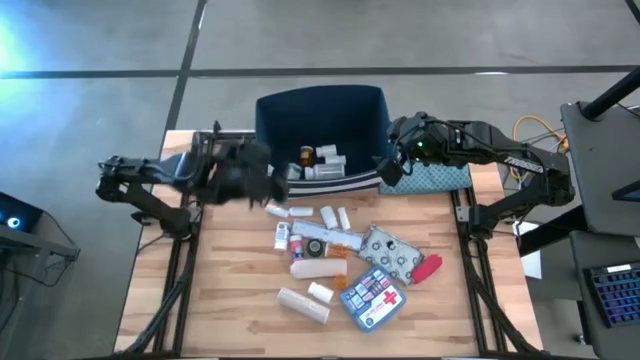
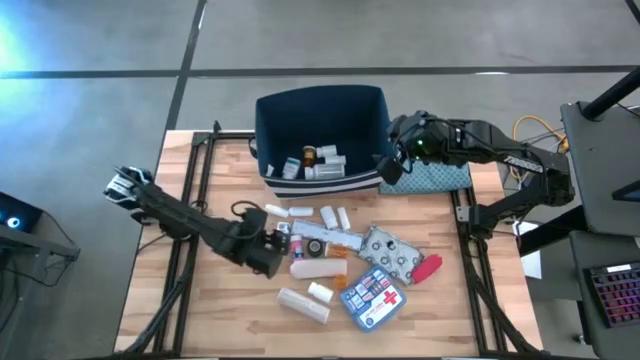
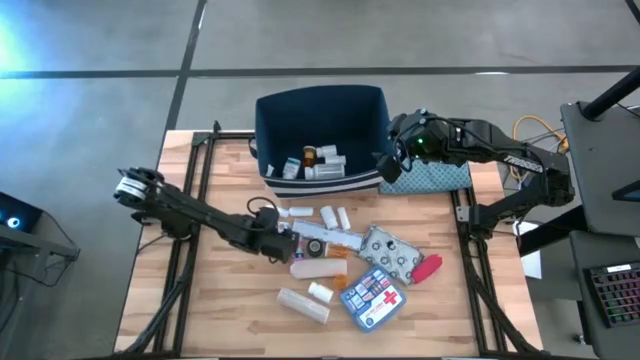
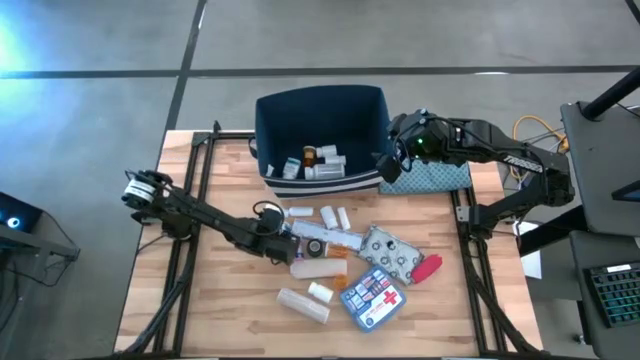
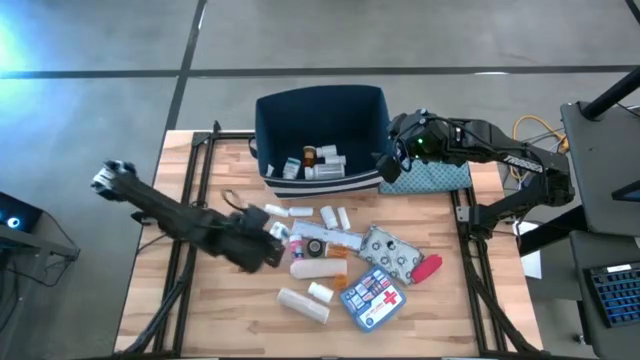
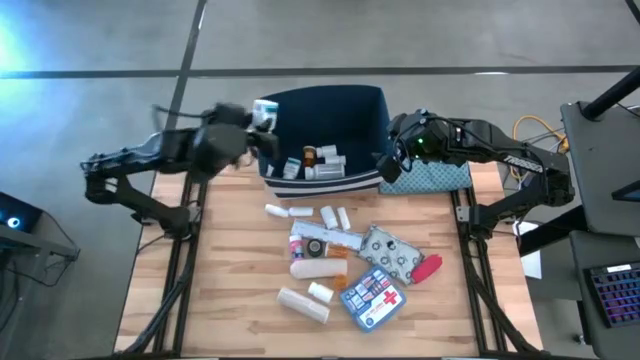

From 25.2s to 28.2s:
Task: Pick & place medical supplies in basket/bin
Put the white medicine bottle into the blue bin

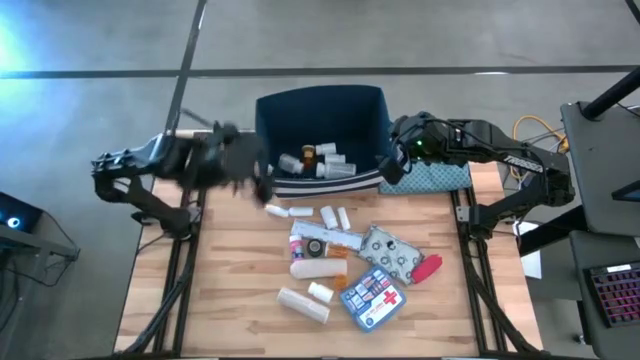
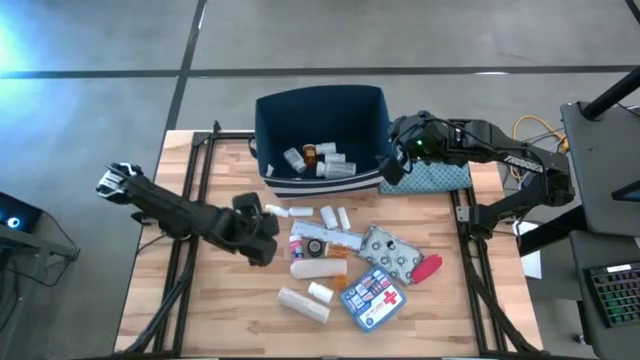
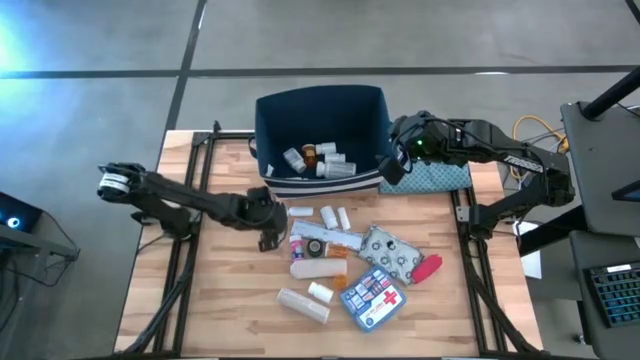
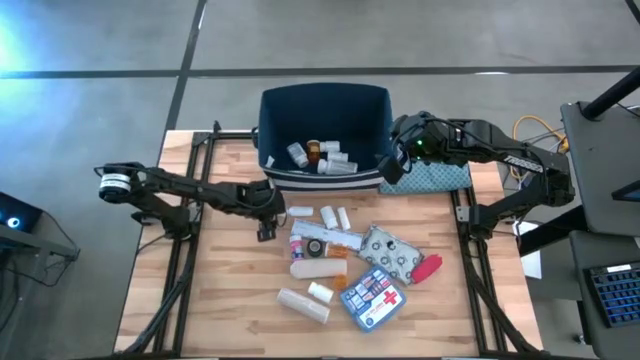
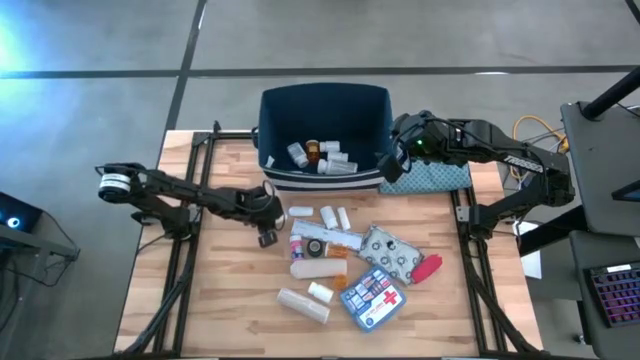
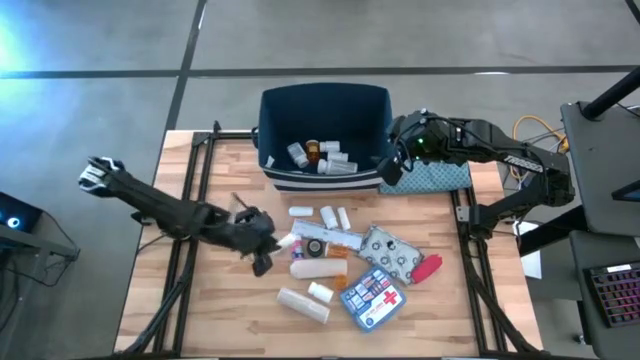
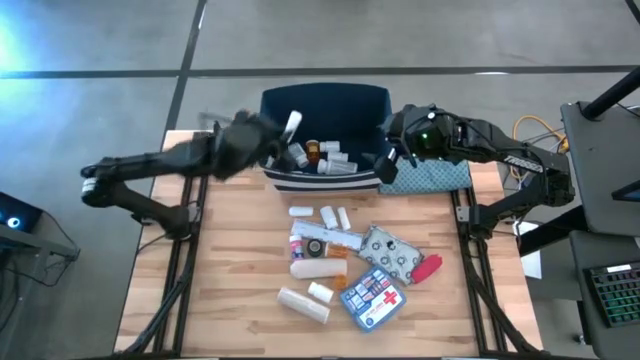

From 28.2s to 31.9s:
Put the white rolled gauze into the blue bin

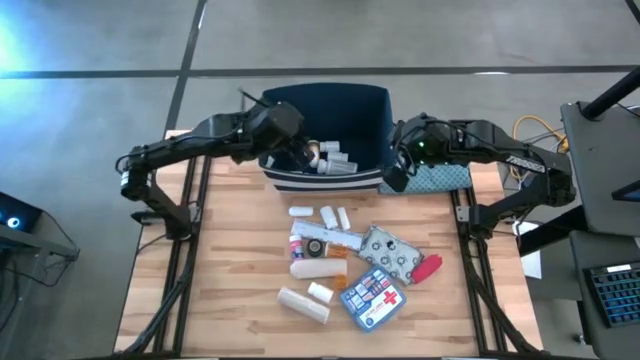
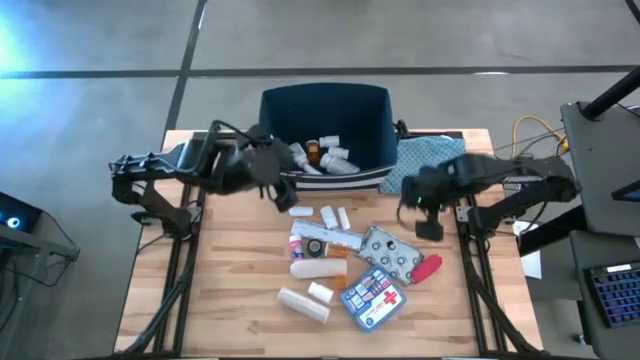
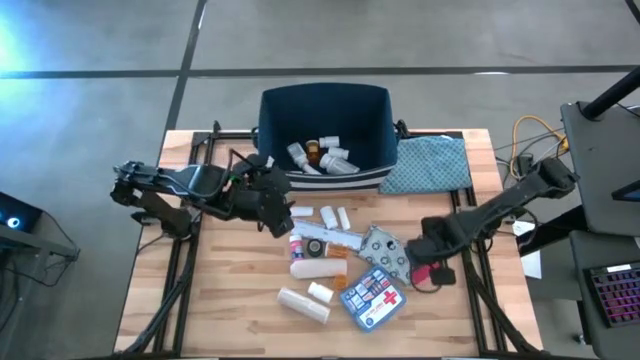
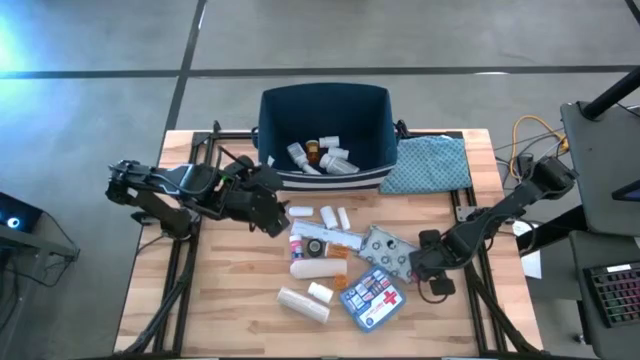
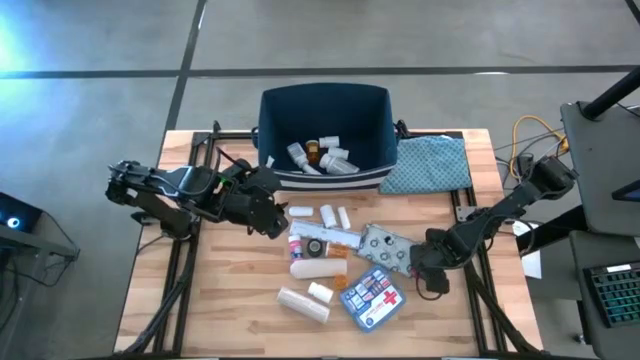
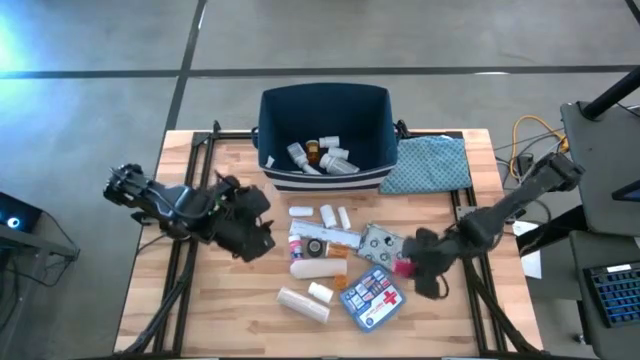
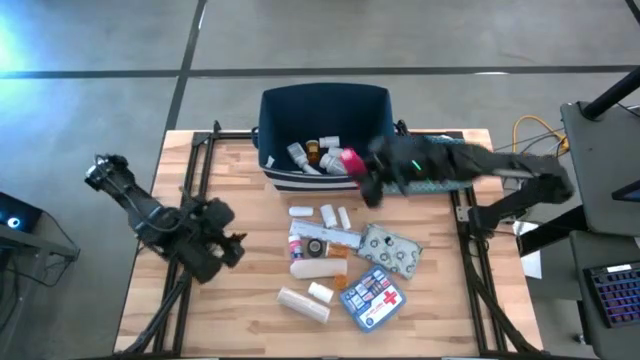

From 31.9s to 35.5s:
Put the red bandage into the blue bin

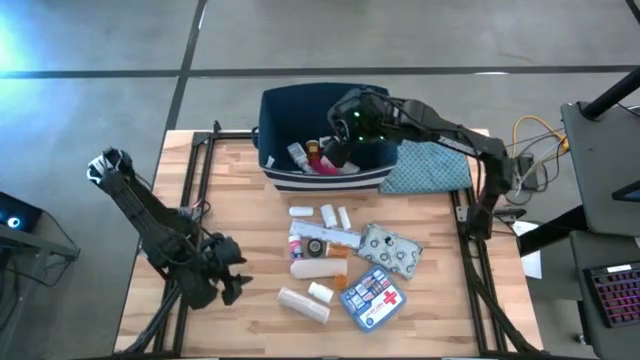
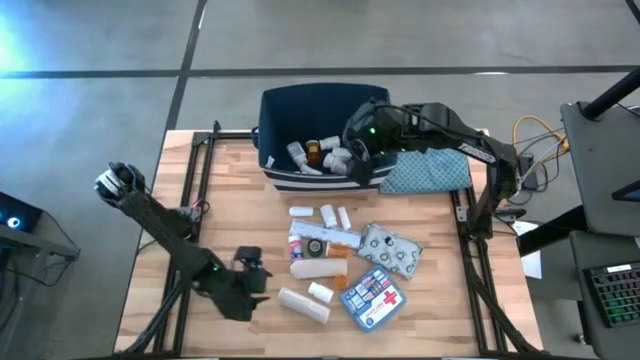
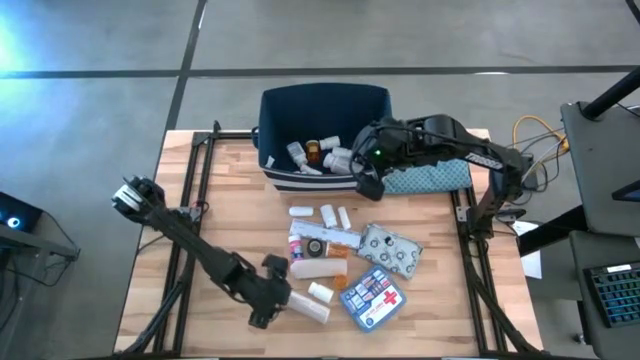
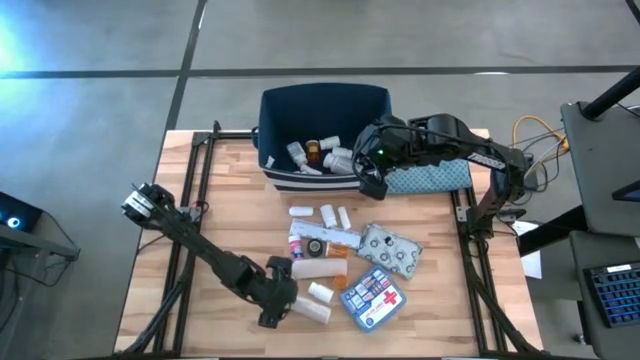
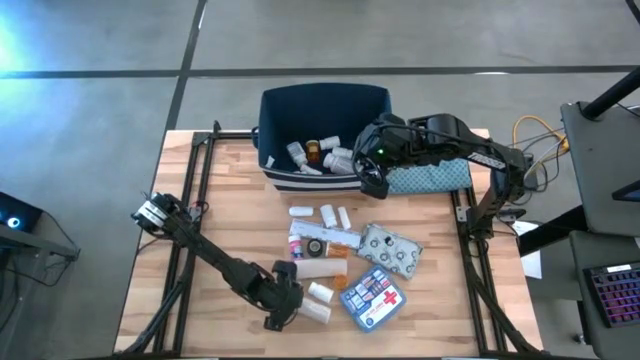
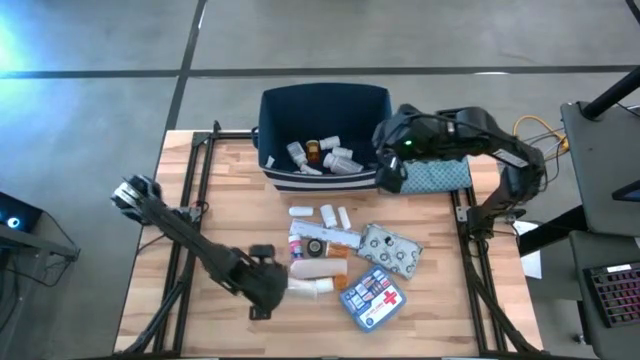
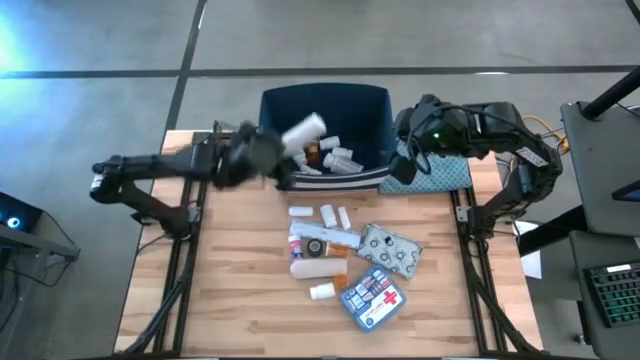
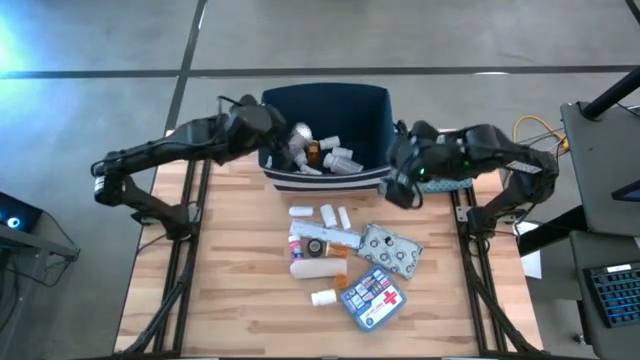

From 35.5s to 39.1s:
Put the gray bandage into the blue bin

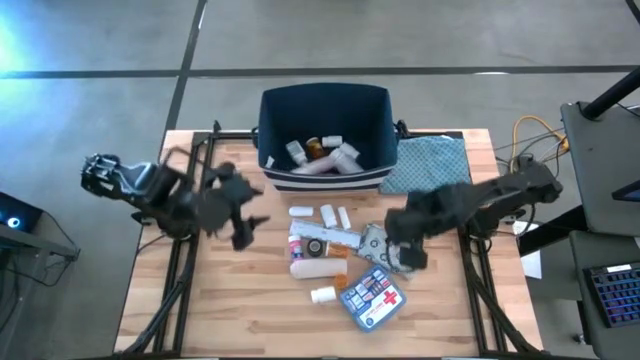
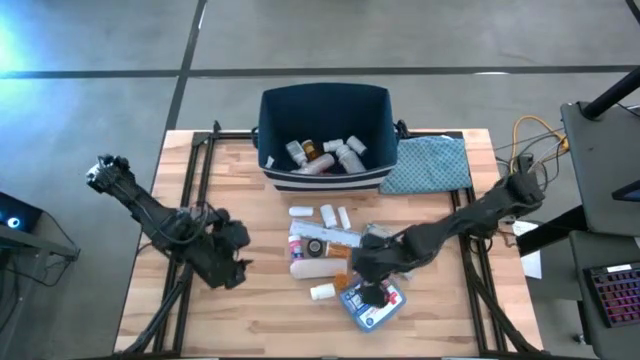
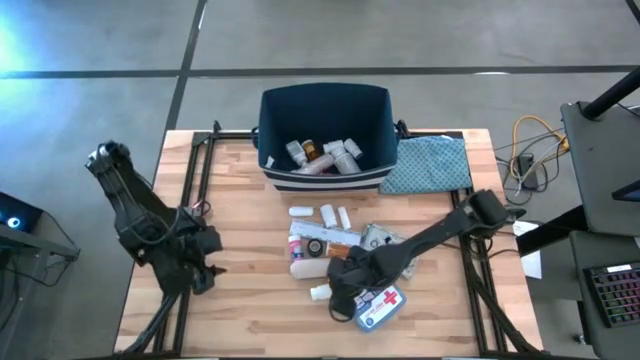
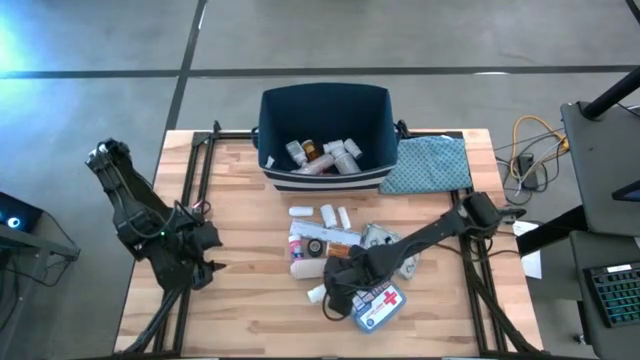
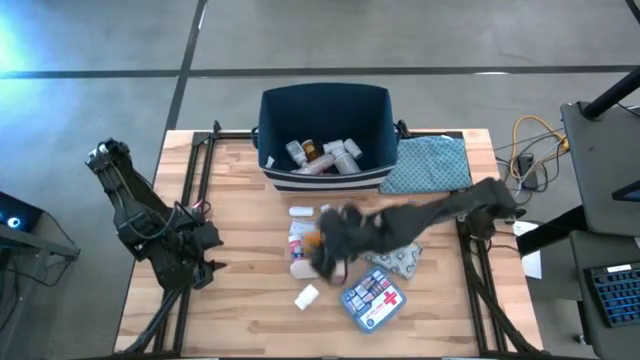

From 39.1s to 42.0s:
Put the orange medicine bottle into the blue bin

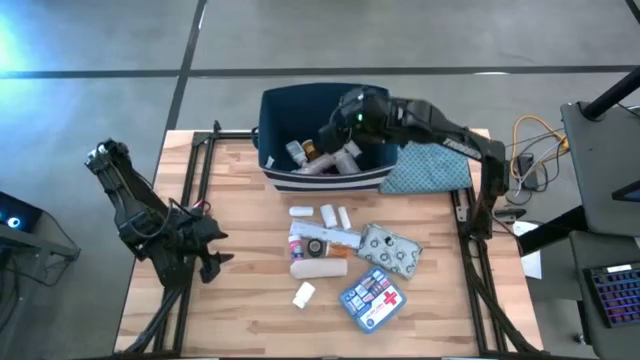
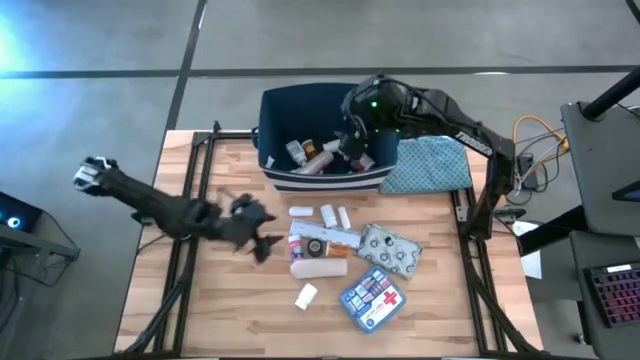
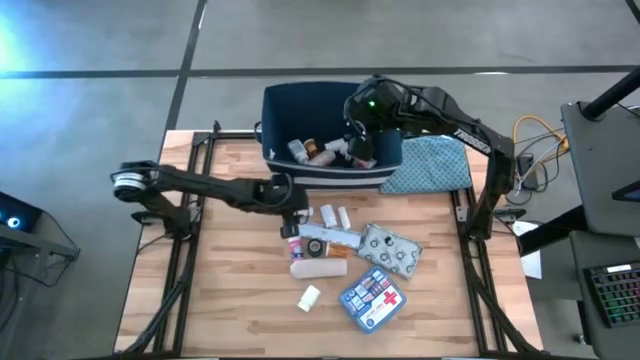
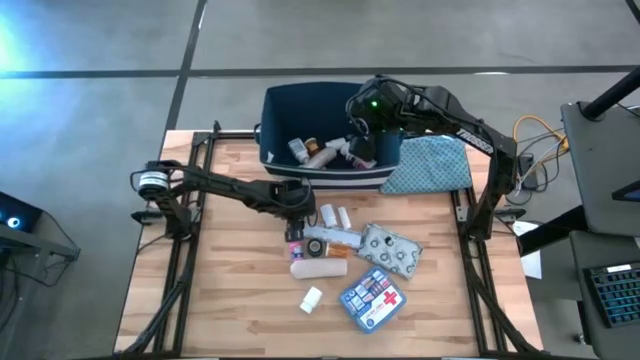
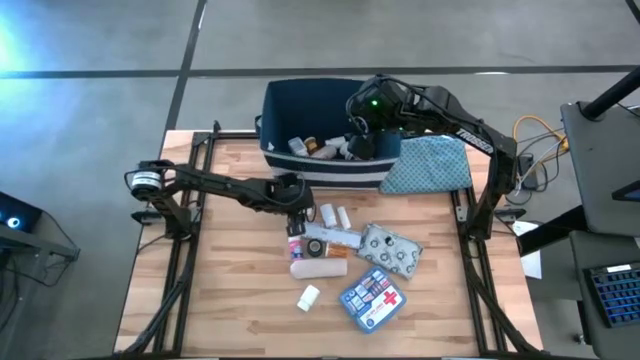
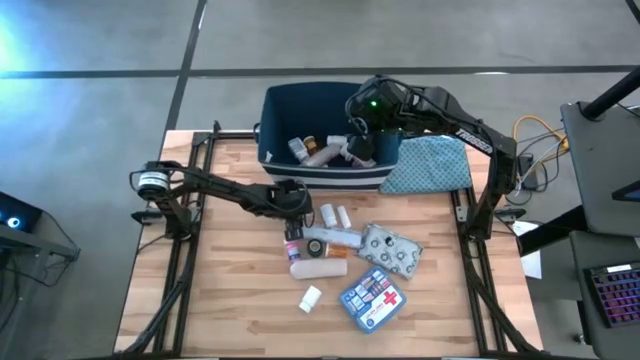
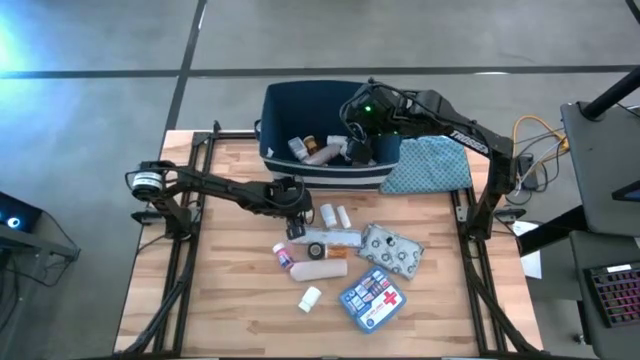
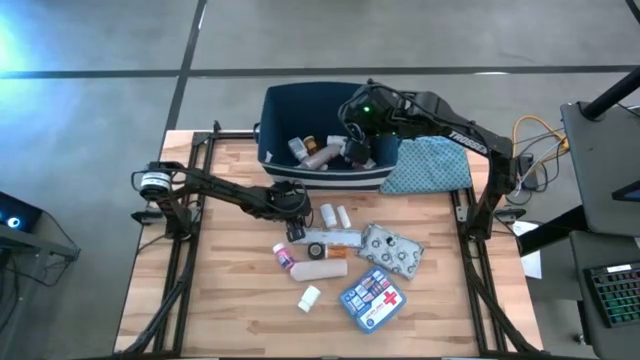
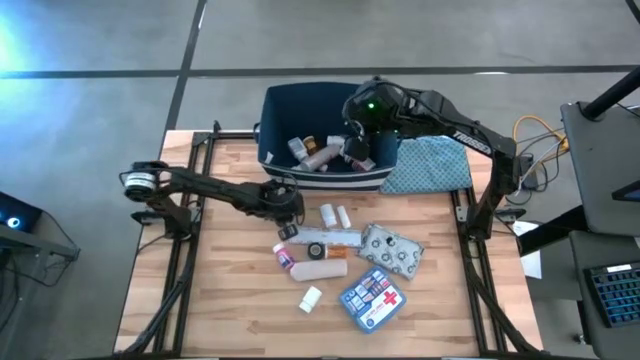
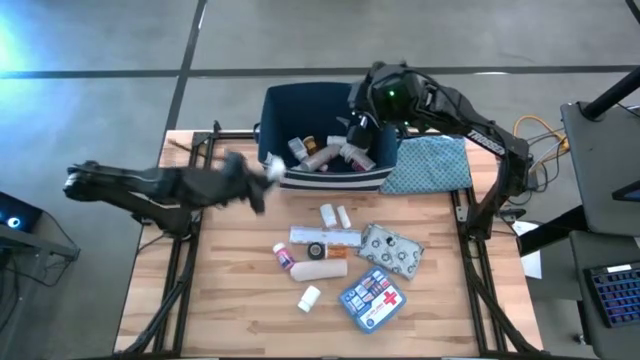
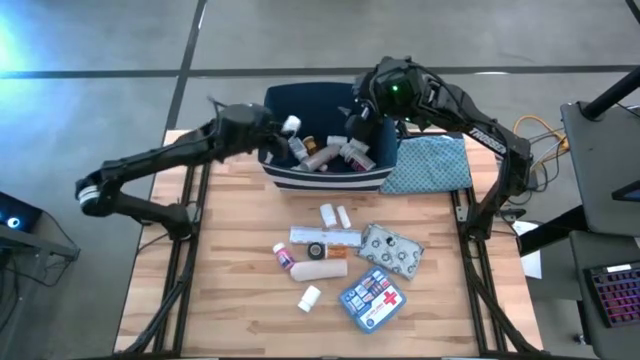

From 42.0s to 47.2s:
Put the white bandage into the blue bin
